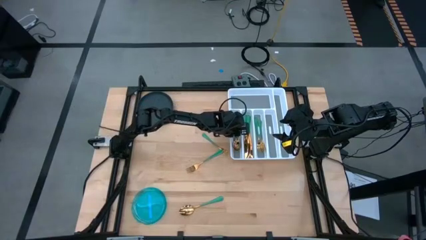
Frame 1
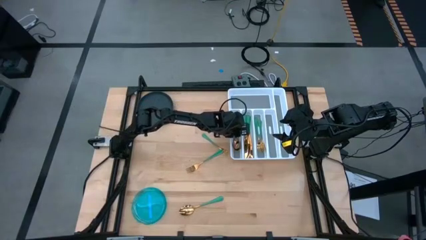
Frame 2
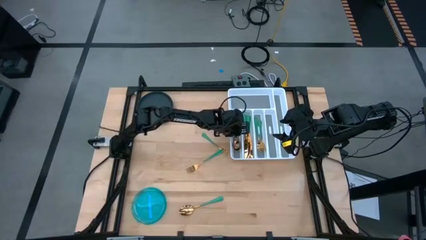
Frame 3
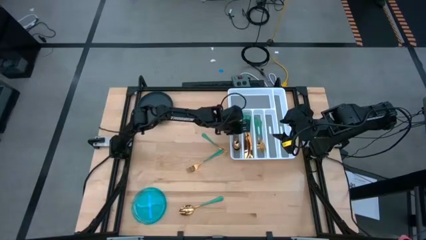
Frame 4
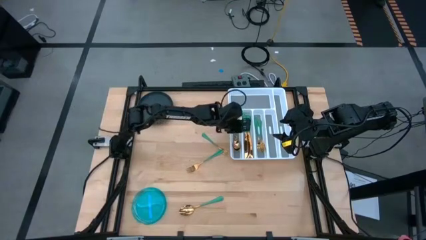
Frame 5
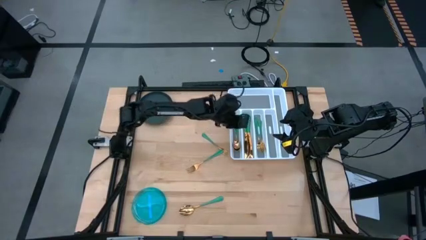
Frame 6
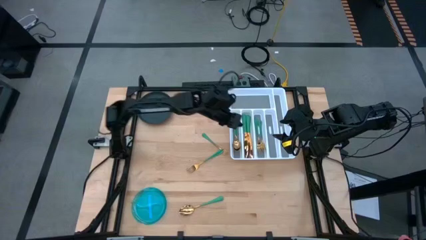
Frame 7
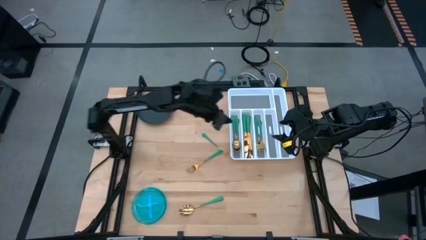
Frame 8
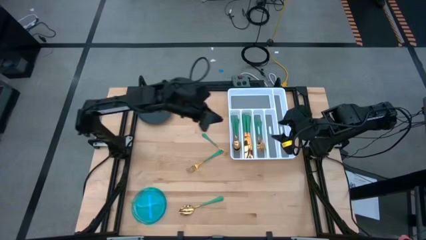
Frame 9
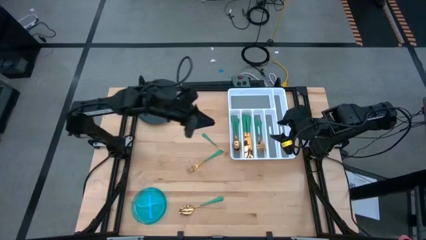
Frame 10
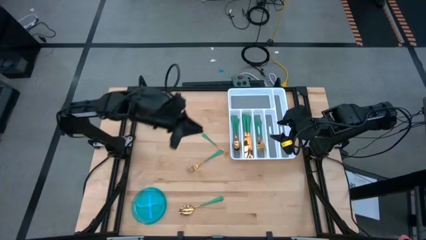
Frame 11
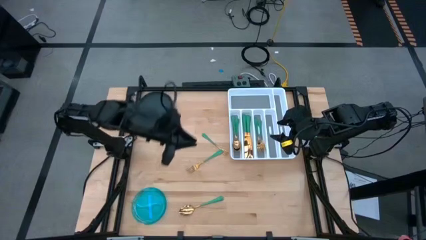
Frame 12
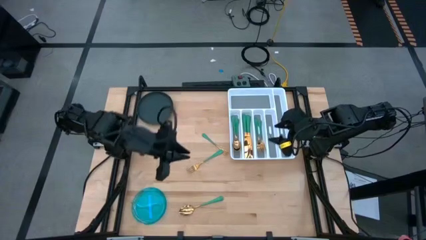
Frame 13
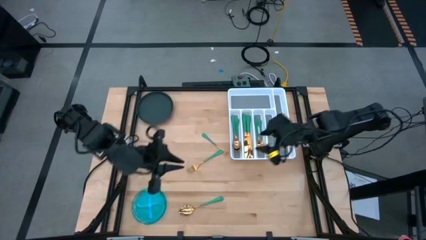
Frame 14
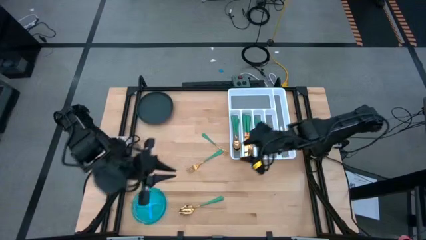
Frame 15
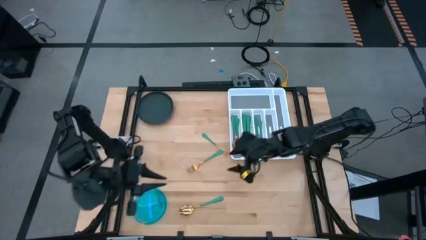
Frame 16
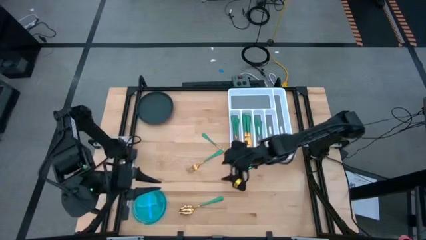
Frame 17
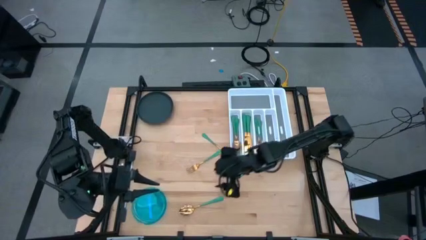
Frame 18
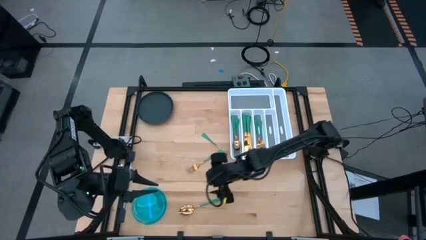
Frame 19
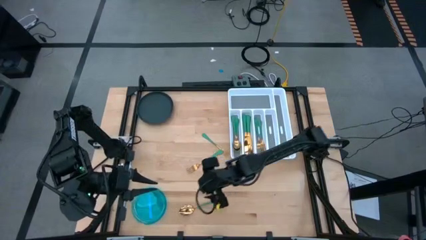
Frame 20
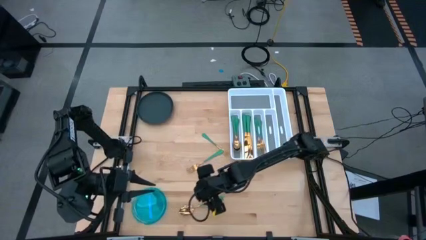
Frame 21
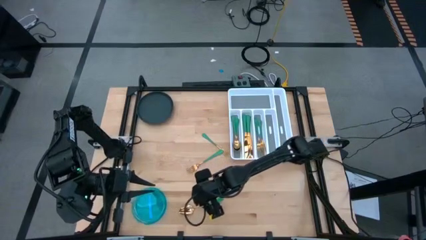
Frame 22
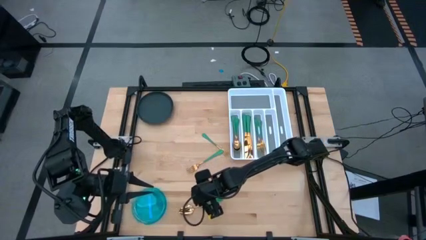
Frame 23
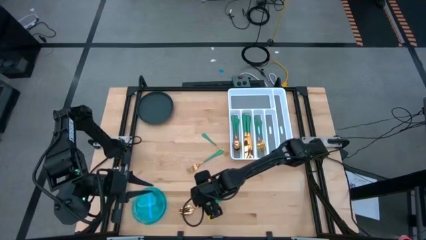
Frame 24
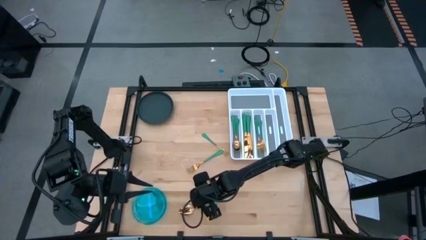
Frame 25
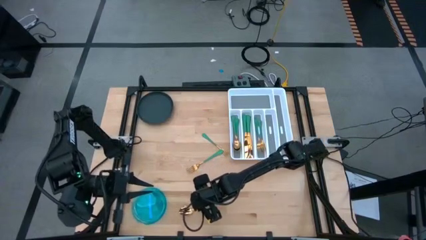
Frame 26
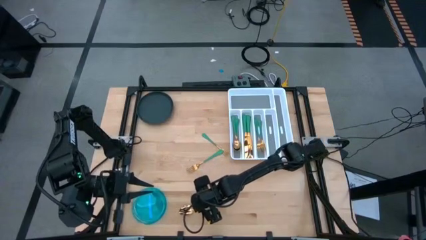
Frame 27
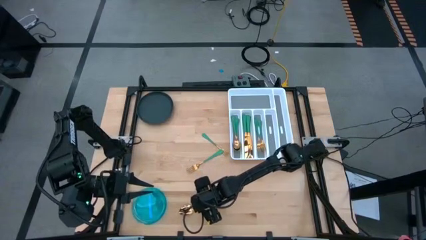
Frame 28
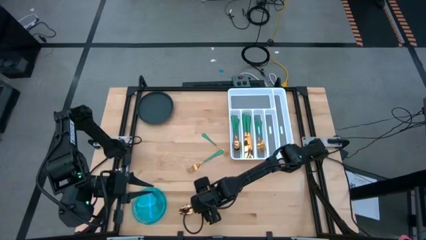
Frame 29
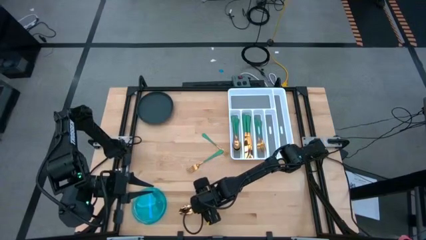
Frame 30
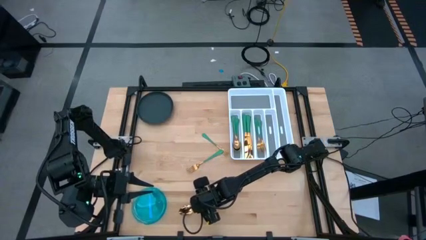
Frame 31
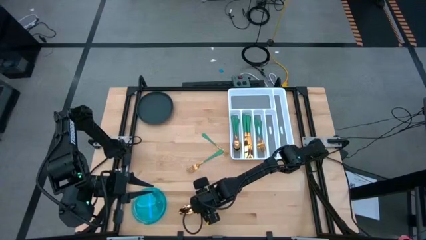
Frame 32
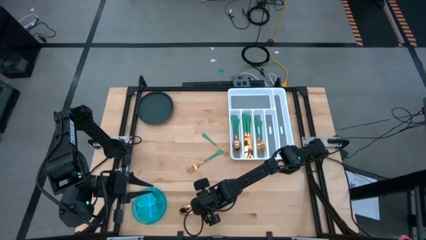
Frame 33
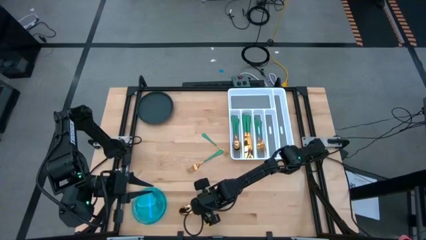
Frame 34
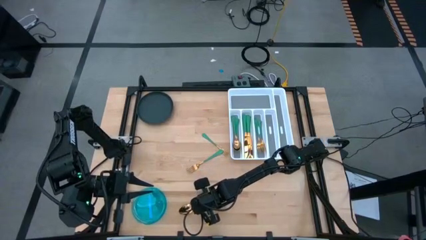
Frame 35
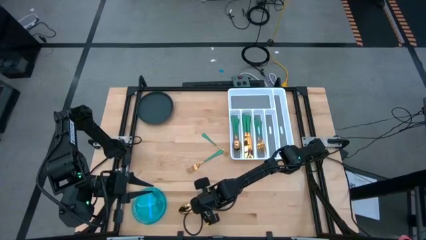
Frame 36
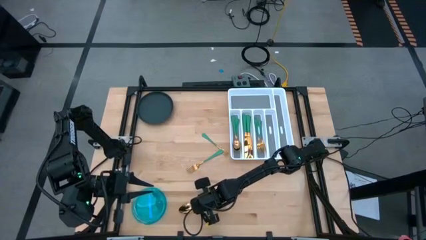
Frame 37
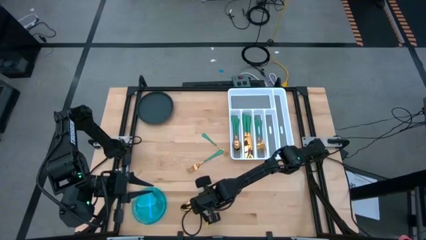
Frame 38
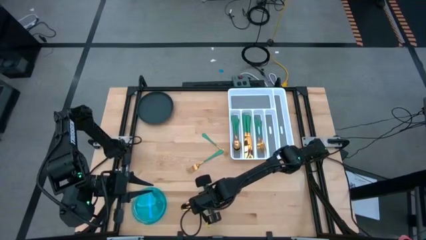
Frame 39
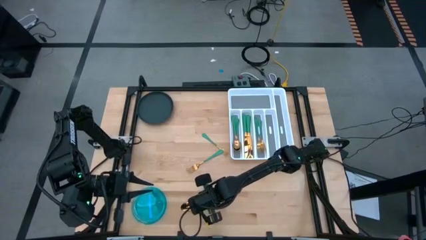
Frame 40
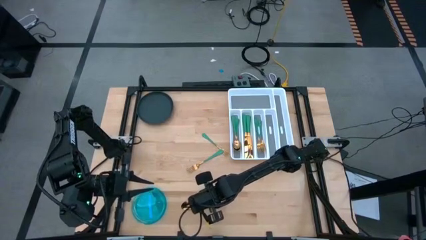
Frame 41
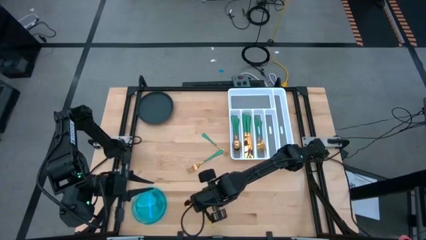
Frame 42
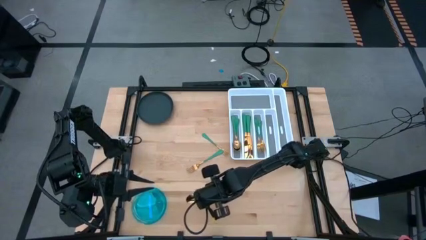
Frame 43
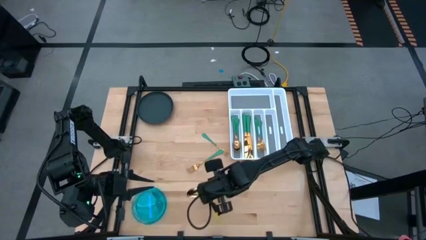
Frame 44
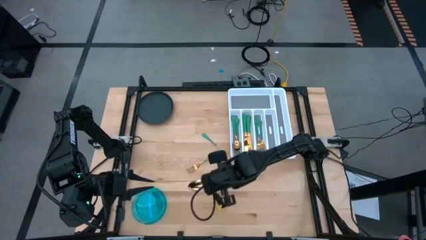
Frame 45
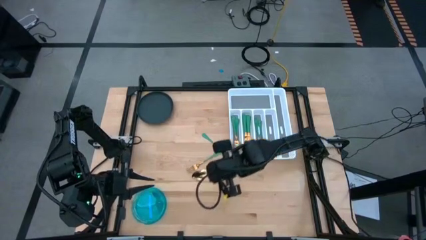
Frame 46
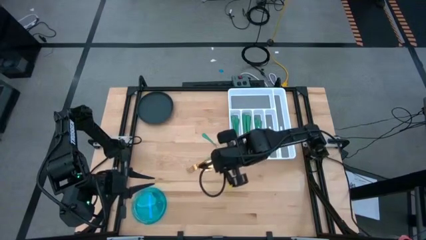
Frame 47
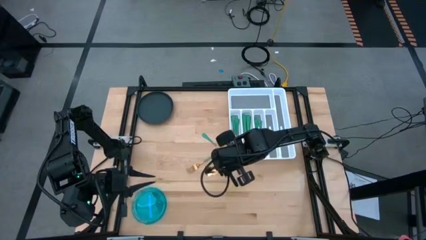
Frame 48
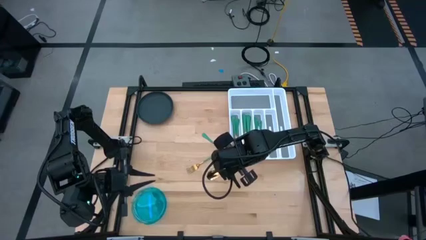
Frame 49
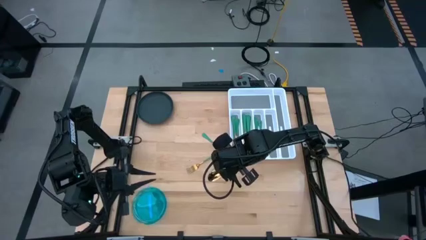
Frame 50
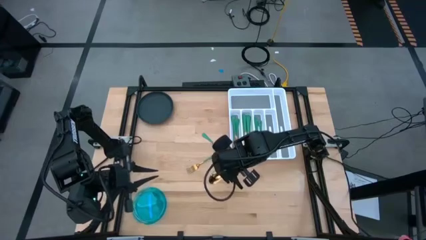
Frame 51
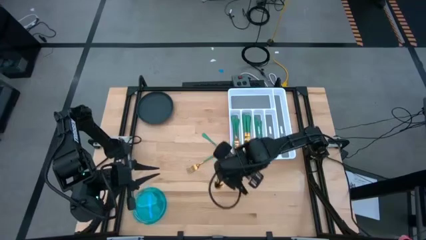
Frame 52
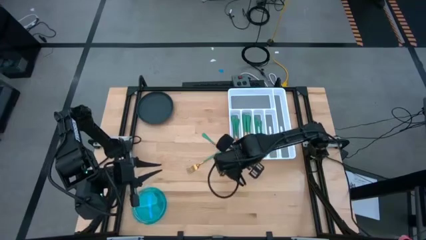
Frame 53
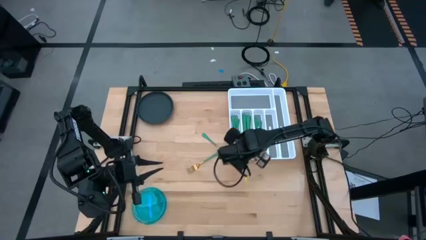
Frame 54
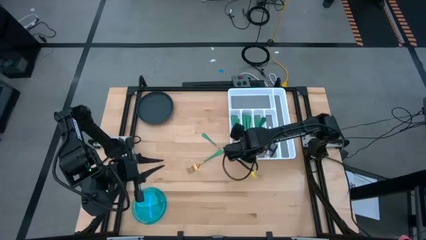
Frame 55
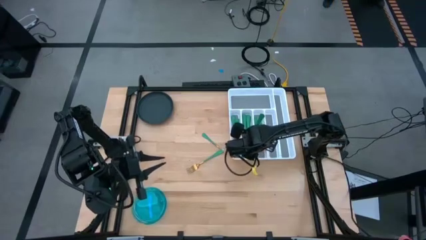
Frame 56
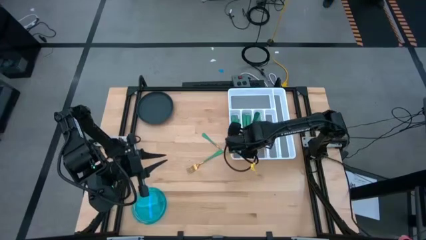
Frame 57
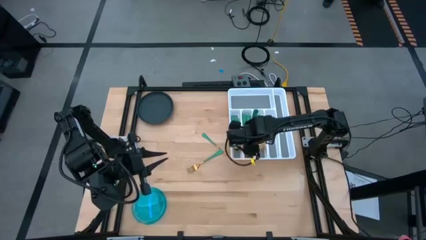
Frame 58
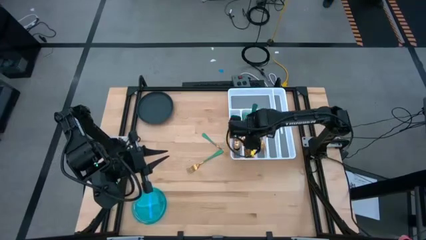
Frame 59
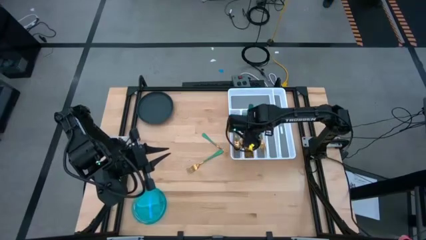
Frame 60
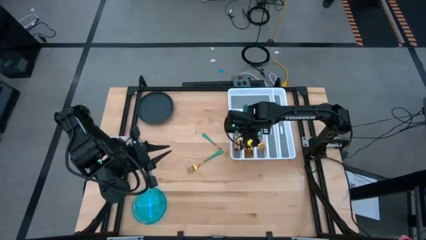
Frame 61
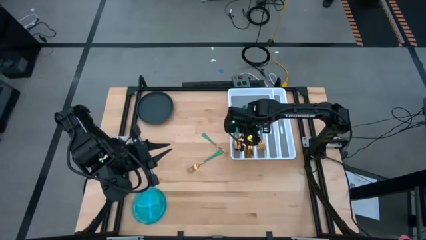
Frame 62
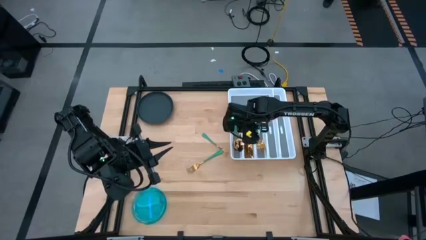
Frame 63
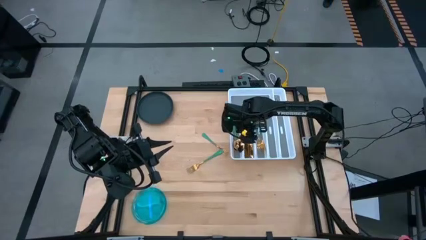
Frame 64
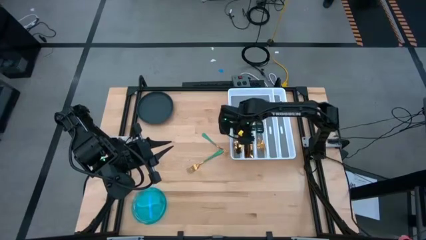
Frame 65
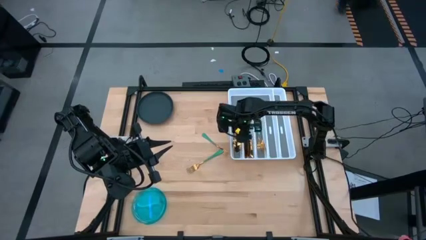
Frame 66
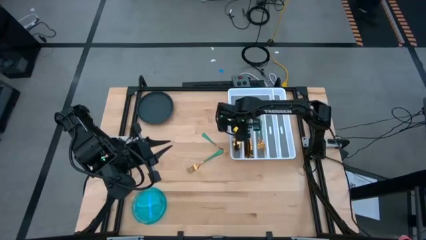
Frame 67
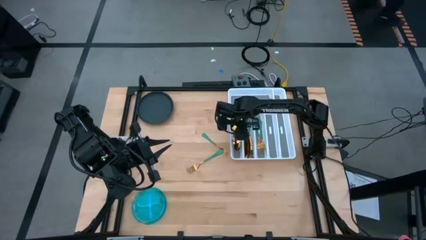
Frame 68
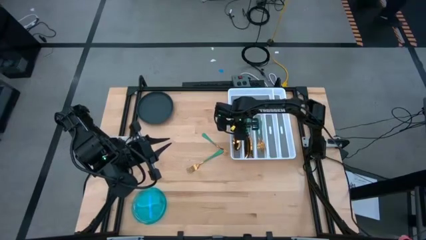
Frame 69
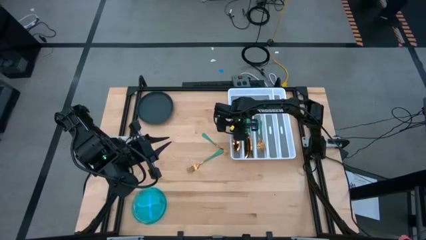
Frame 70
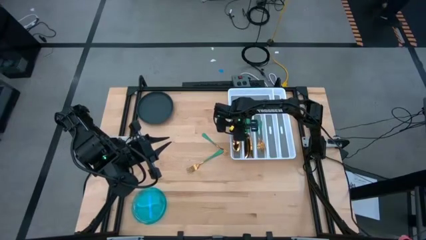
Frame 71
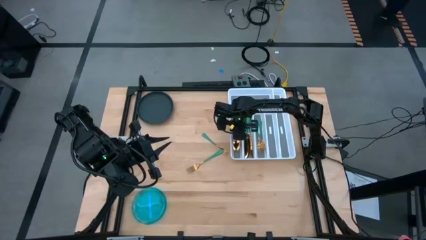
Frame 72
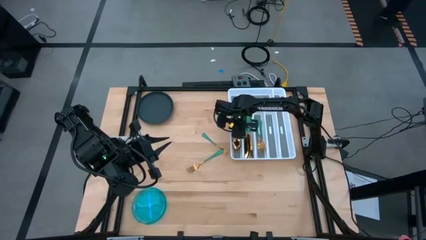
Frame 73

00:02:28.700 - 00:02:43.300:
Task: Sort silverware
Put the green spoon into the left slot of the white silverware tray
